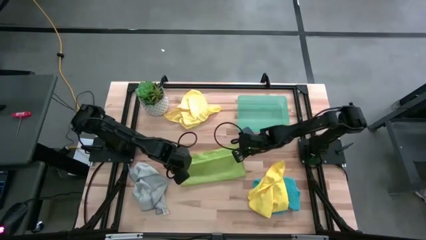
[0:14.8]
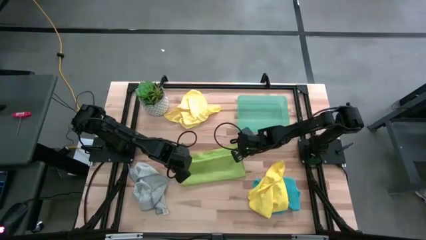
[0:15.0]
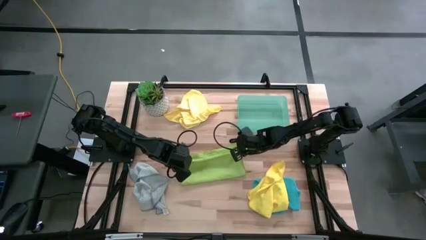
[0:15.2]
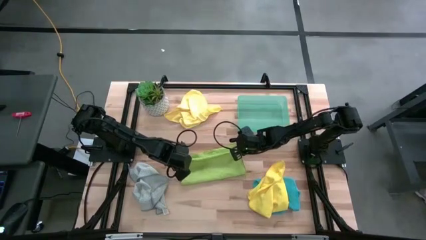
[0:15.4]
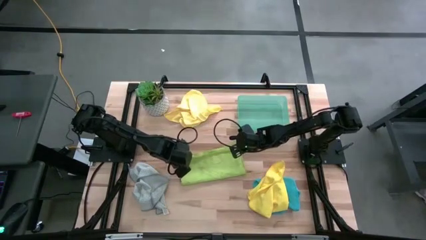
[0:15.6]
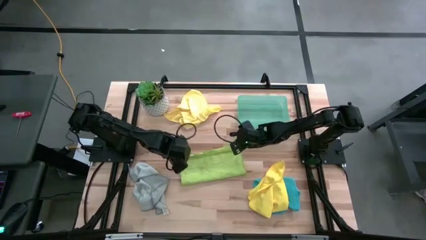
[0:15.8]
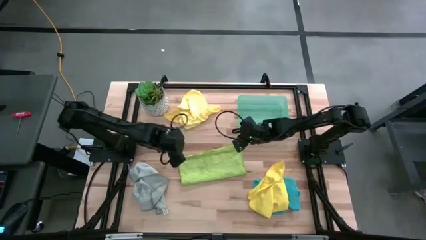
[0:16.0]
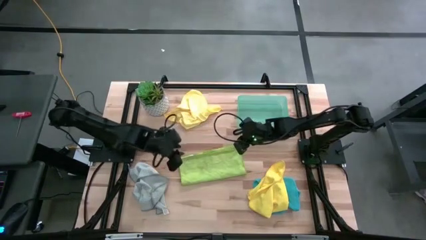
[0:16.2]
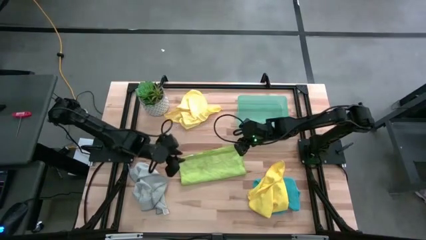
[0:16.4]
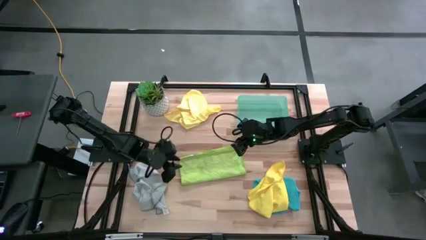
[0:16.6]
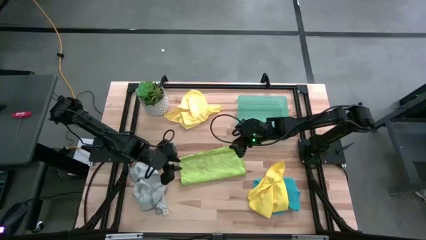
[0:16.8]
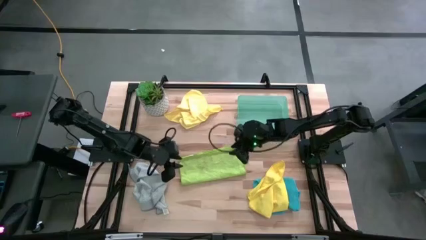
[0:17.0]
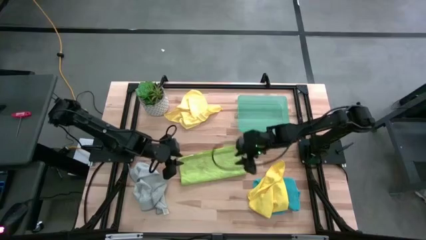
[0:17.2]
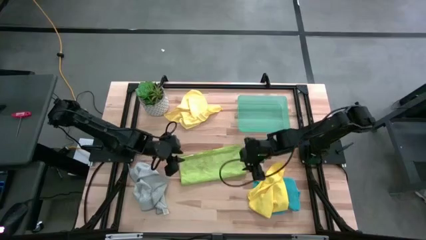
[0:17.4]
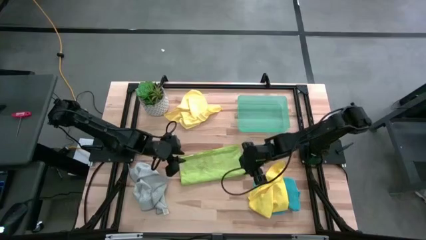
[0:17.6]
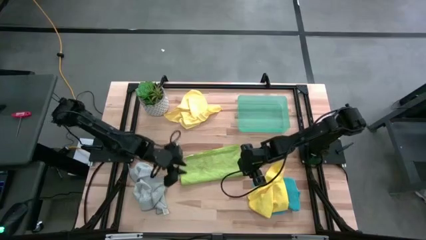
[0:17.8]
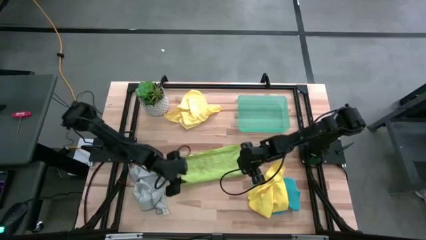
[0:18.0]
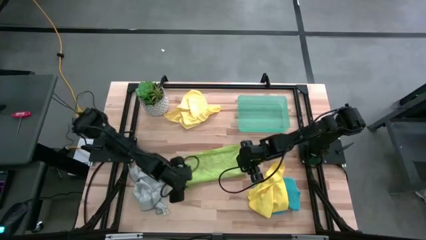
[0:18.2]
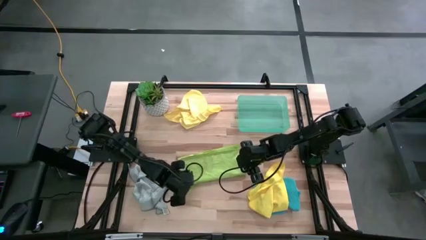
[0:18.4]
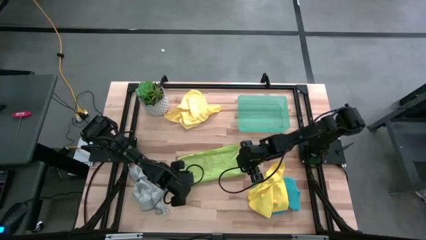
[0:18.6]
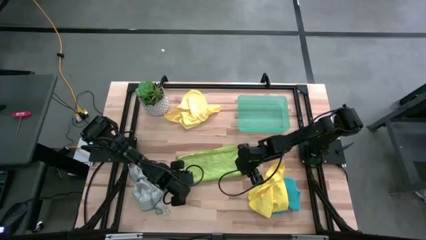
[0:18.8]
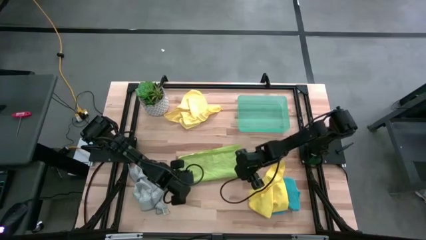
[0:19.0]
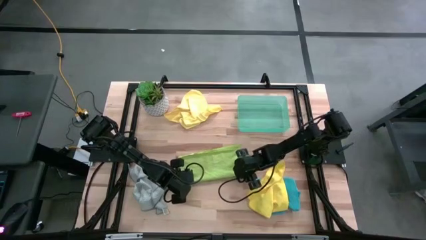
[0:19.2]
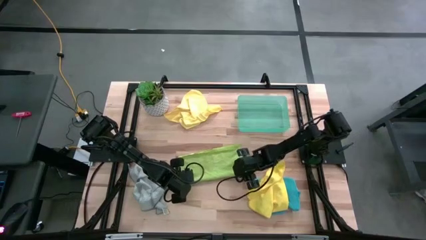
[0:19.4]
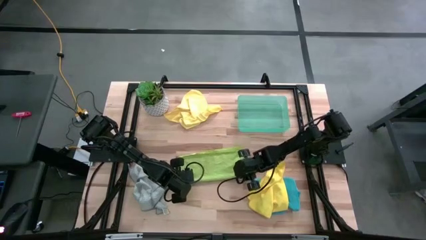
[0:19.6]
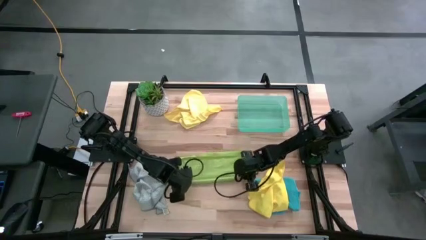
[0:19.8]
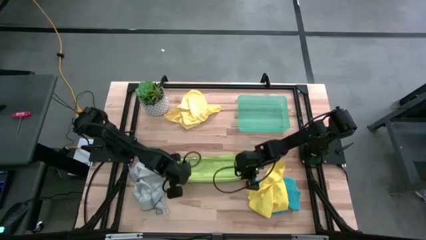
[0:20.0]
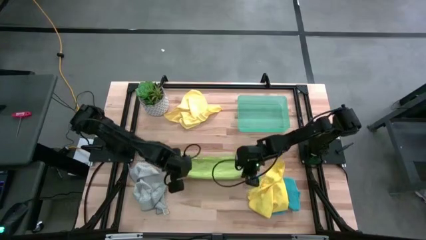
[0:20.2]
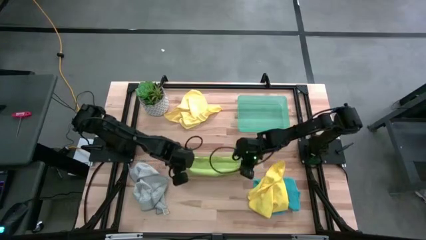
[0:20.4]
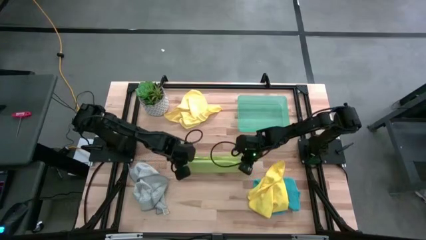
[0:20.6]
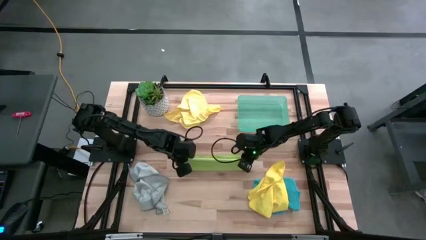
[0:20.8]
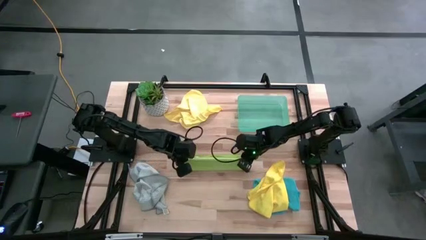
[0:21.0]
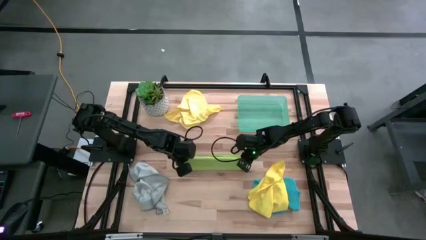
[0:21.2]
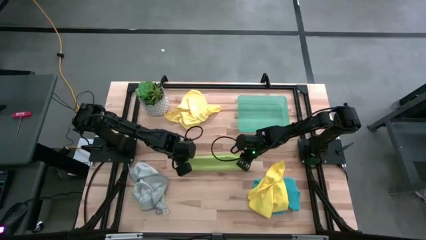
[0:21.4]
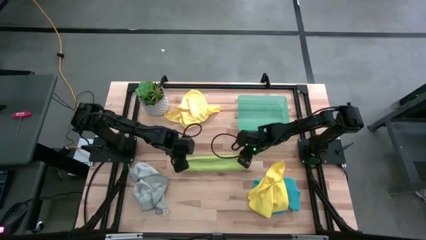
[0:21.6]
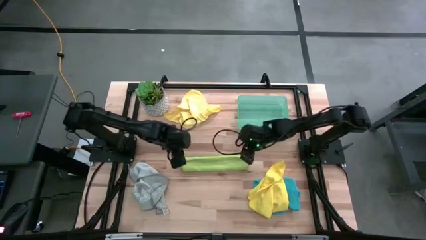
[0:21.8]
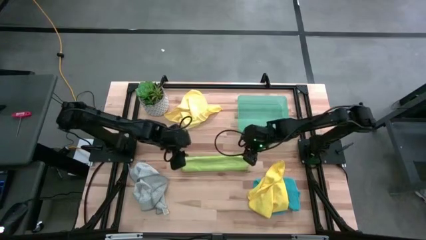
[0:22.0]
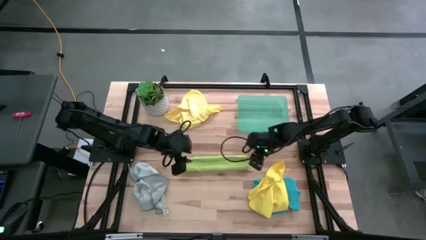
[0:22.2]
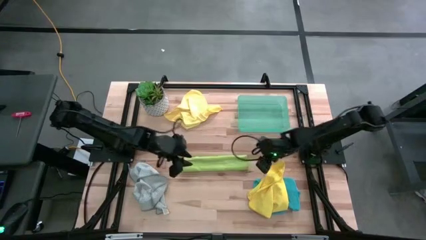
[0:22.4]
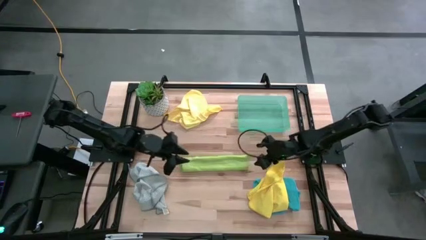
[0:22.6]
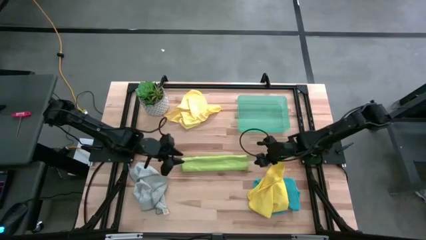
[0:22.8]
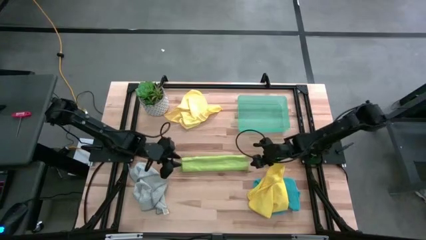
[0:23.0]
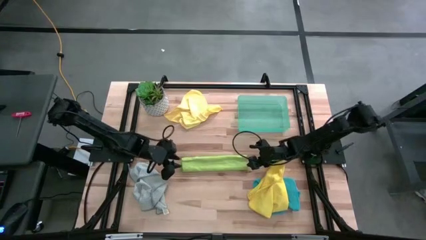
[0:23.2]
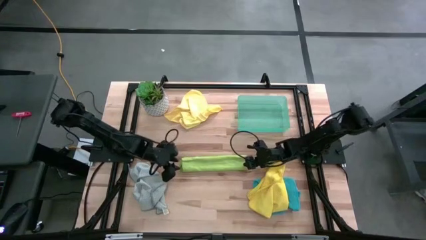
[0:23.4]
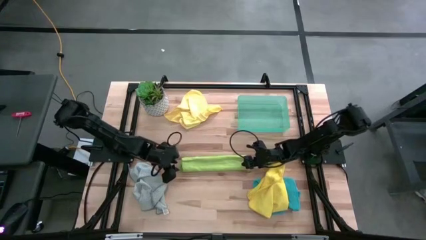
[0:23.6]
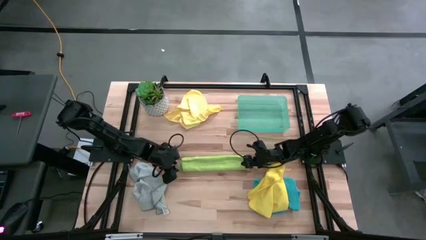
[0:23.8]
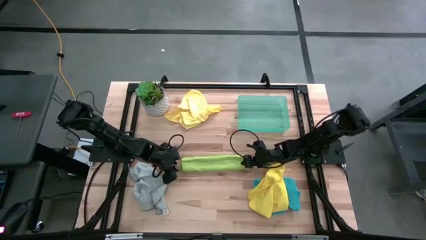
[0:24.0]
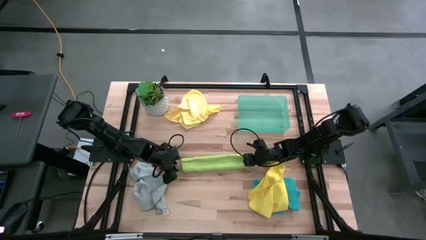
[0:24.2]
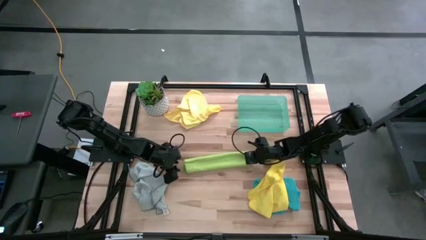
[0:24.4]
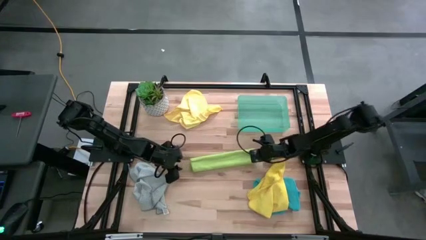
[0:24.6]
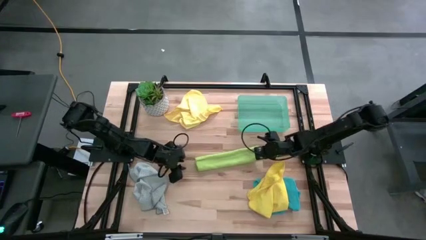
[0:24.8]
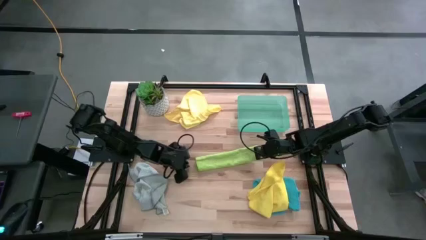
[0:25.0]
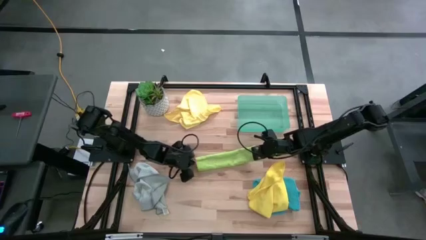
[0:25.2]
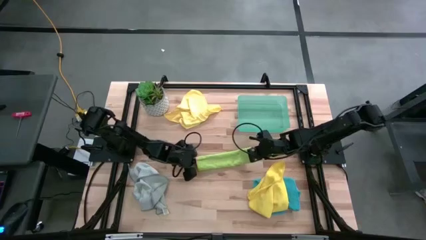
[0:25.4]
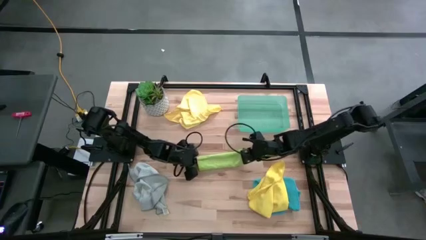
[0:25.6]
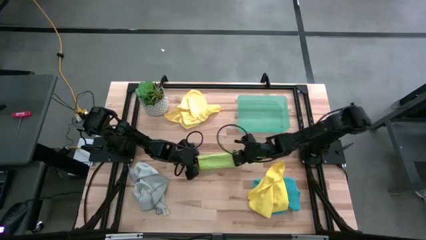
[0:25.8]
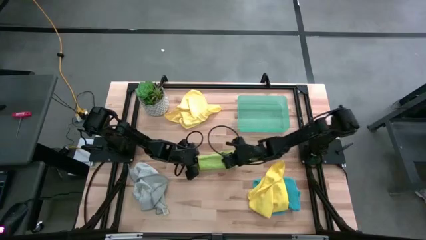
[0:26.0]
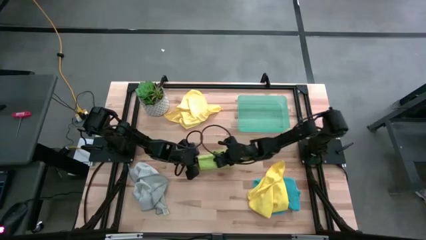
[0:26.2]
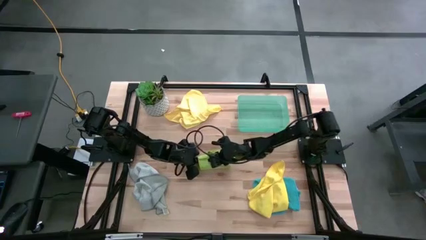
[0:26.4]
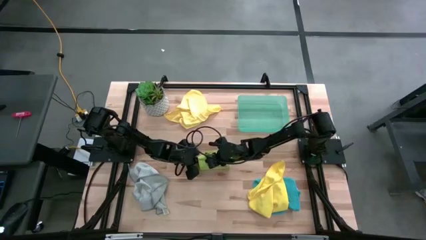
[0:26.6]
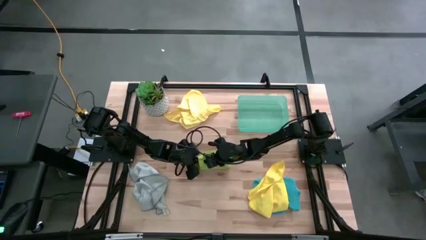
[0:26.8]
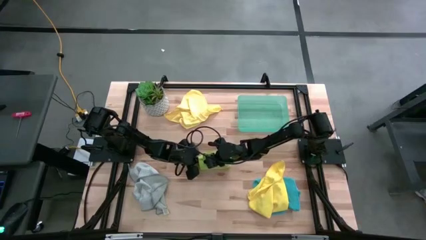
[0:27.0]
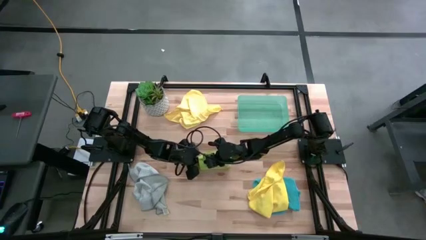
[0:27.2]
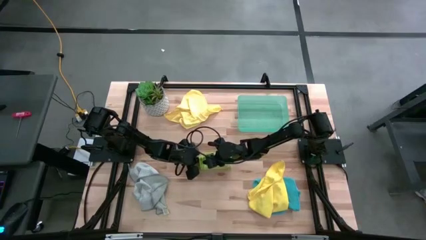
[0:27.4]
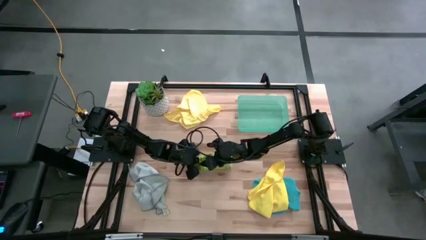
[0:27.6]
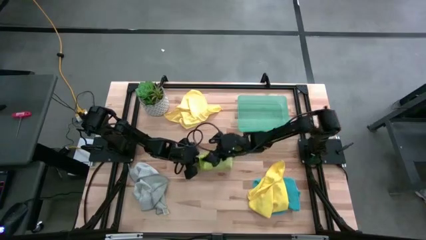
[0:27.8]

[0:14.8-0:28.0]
Task: Fold microfiber towels
Fold the light green towel
